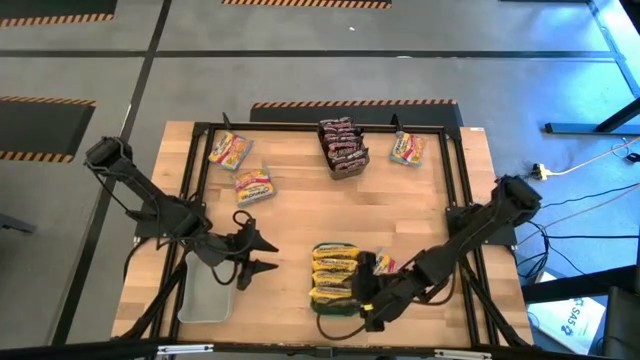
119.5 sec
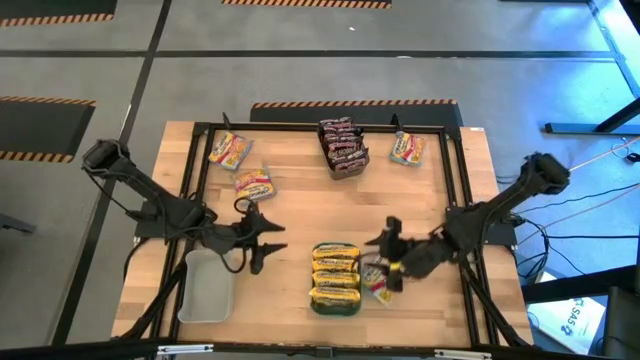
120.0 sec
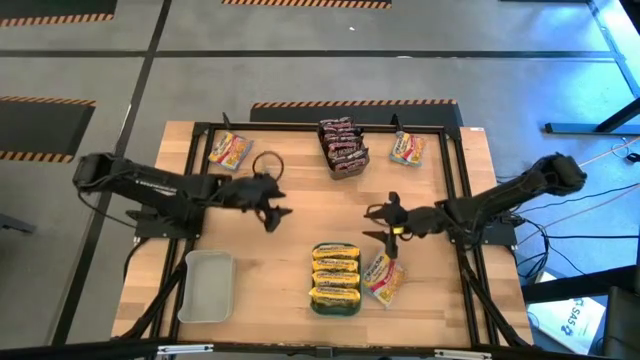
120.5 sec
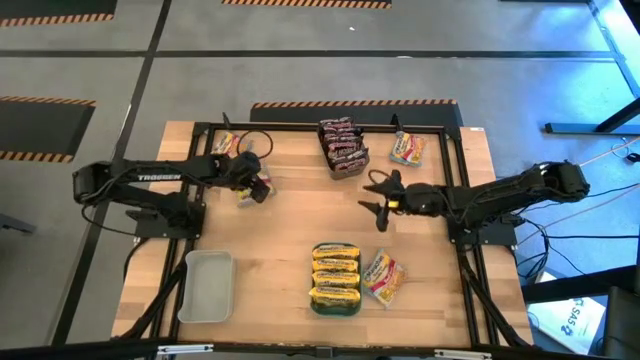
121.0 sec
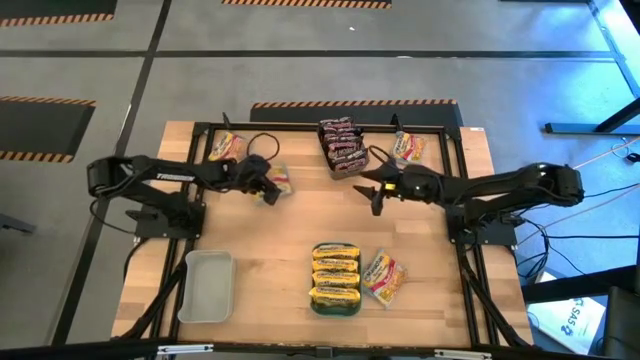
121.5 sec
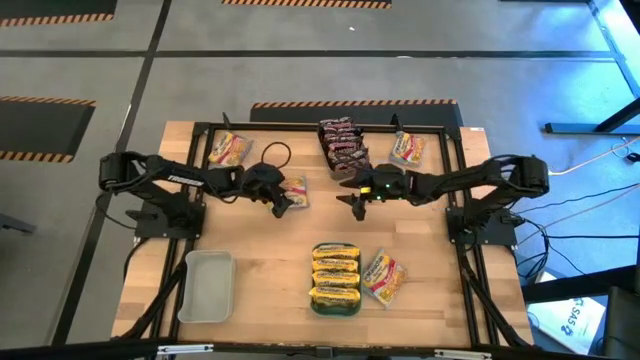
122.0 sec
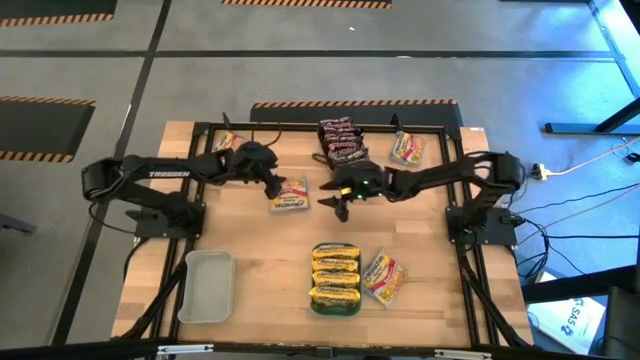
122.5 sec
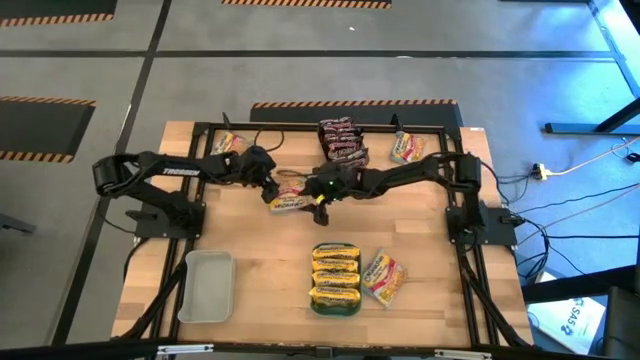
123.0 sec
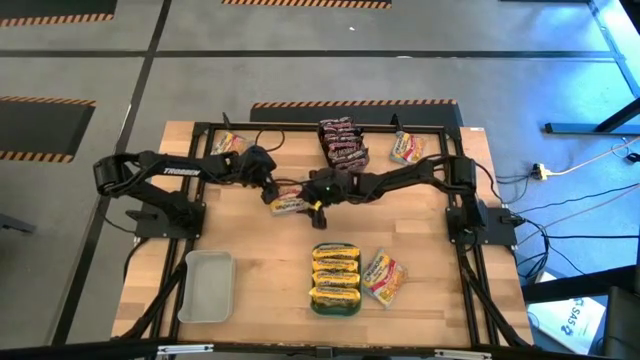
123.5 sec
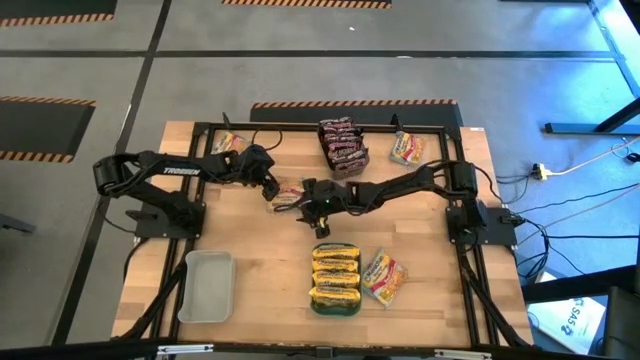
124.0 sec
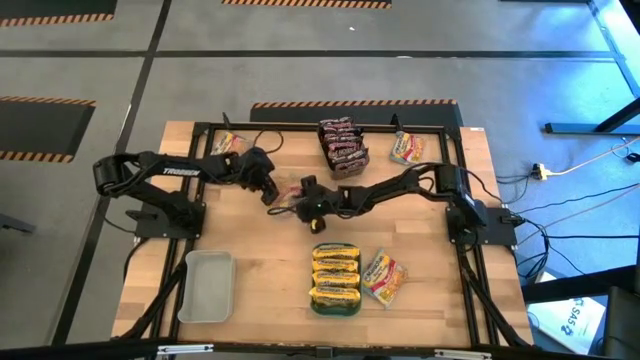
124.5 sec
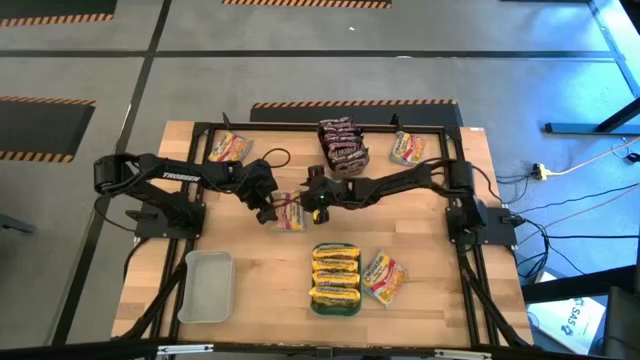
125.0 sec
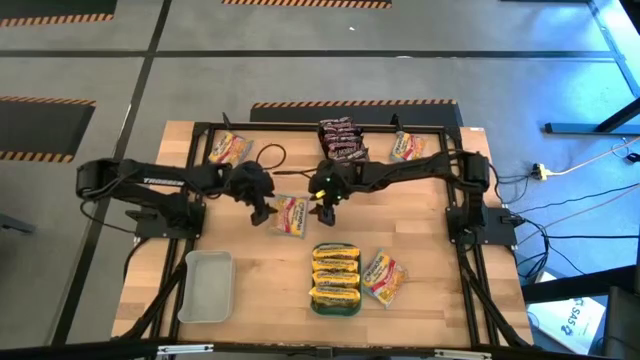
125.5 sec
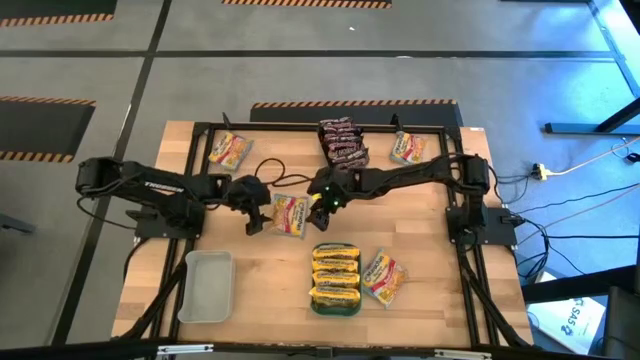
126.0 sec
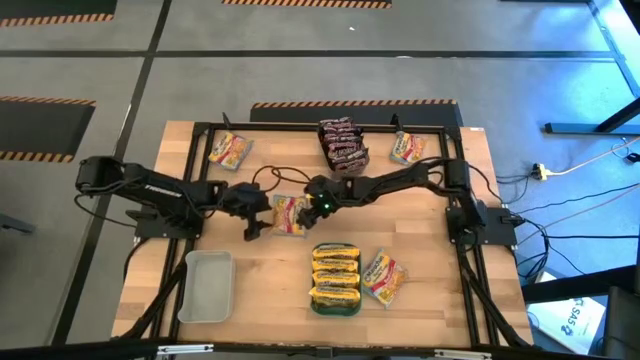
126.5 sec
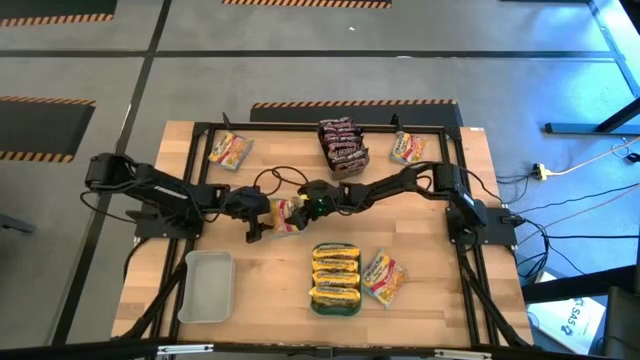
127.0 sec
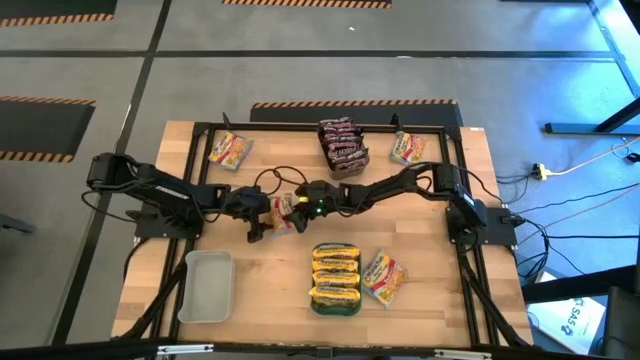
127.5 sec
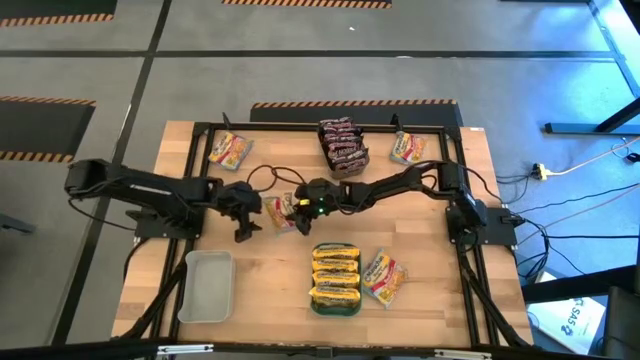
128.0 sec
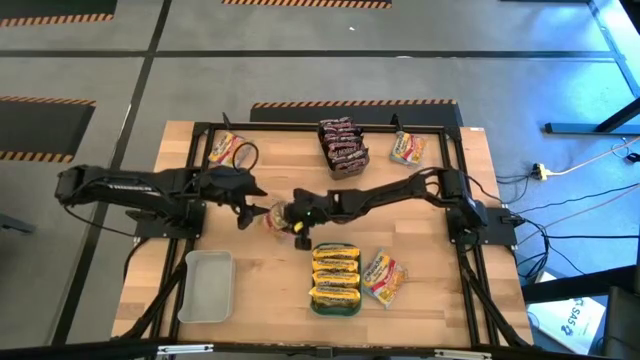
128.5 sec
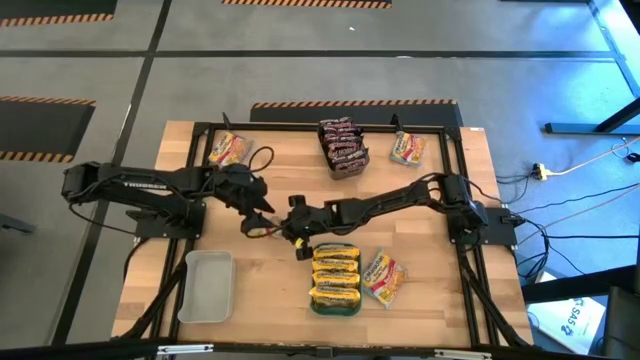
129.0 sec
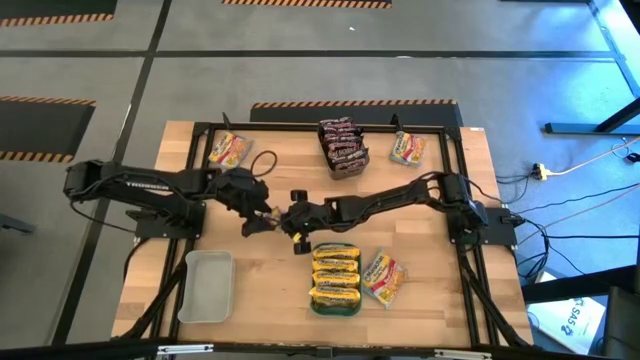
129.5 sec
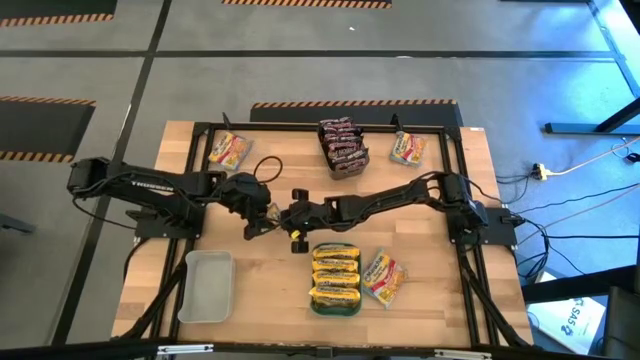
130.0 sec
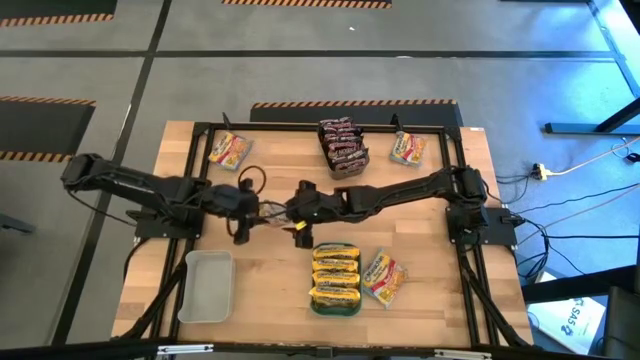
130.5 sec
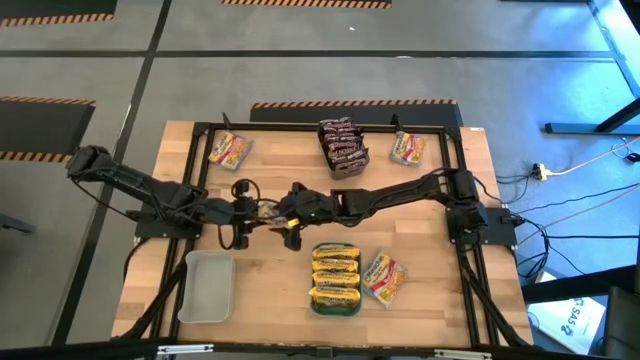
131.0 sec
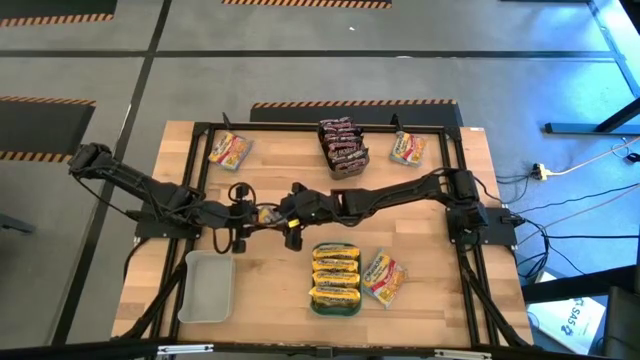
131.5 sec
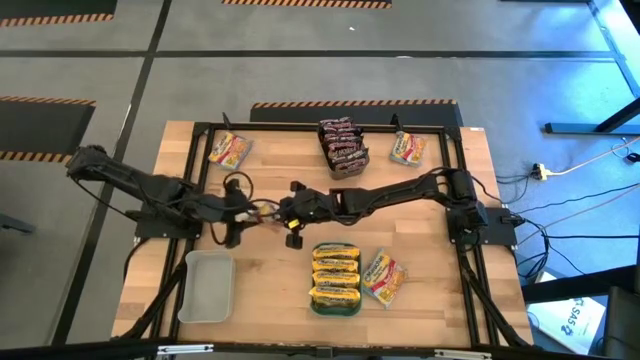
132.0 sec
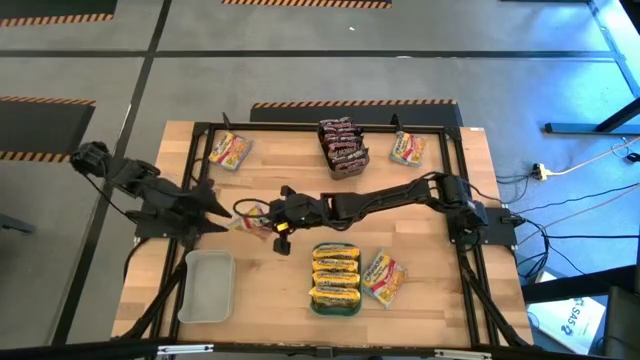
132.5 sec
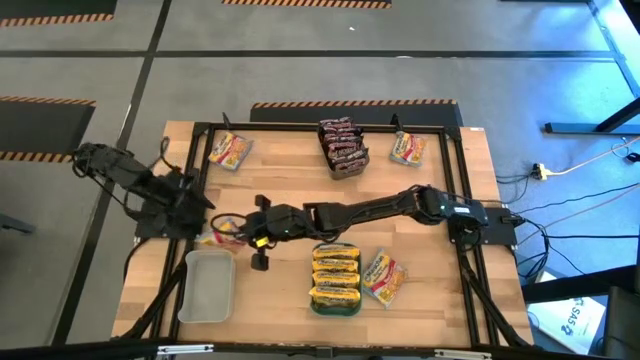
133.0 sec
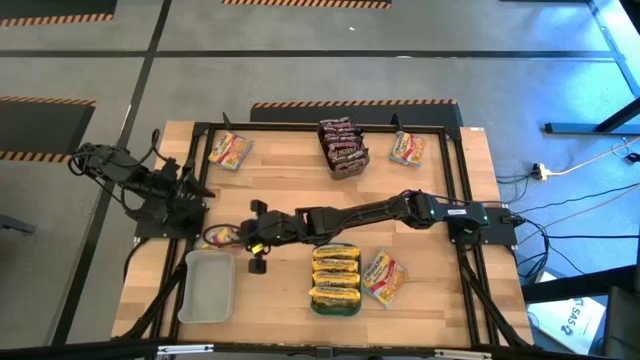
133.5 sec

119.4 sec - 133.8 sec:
Task: Sort Maruchan noodles
Put the blue noodle pack into the white bin

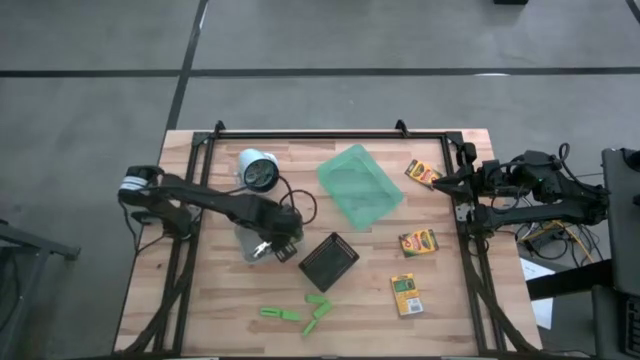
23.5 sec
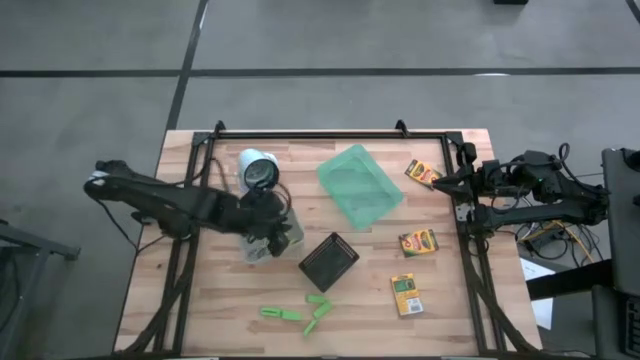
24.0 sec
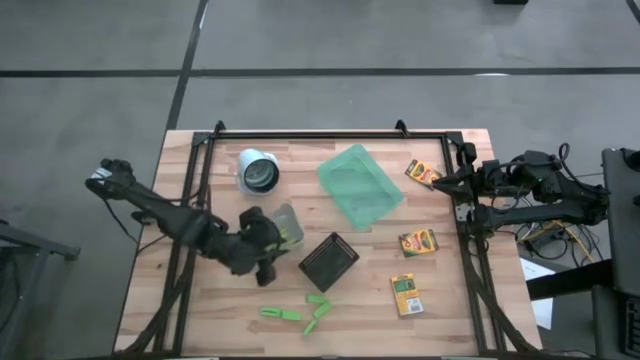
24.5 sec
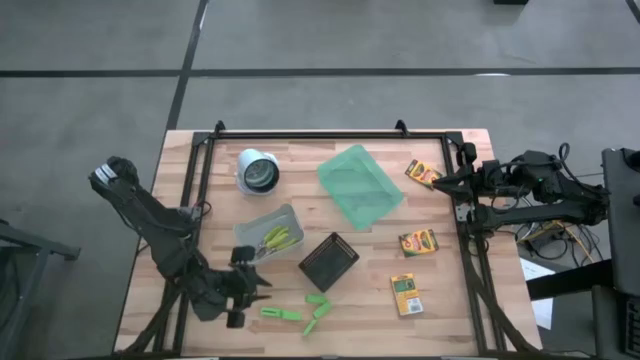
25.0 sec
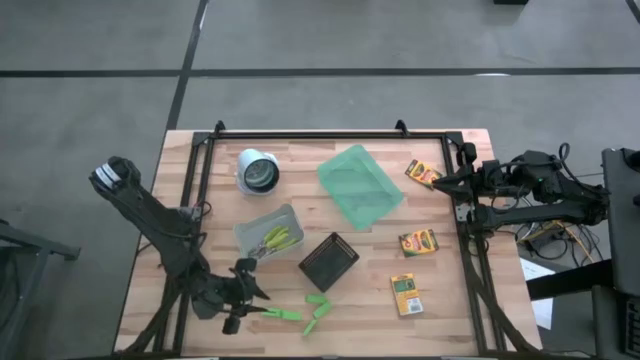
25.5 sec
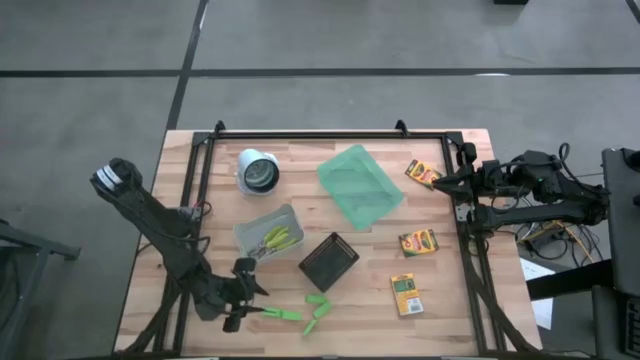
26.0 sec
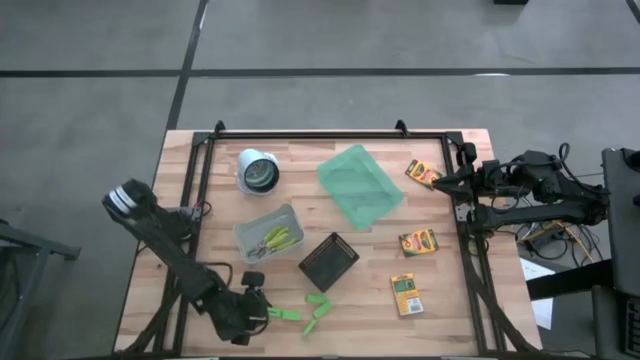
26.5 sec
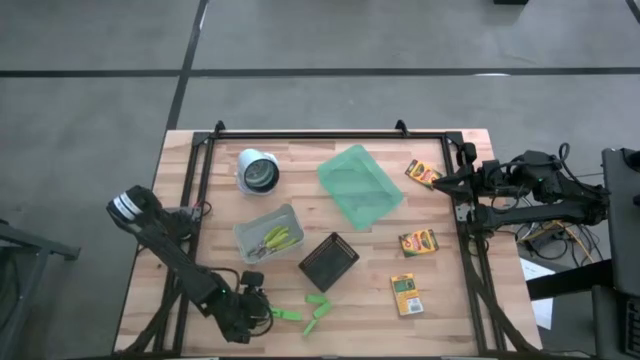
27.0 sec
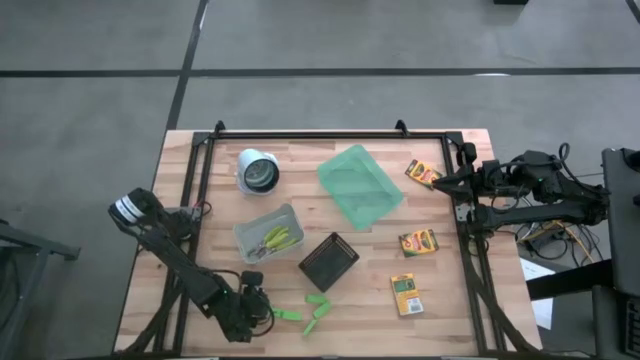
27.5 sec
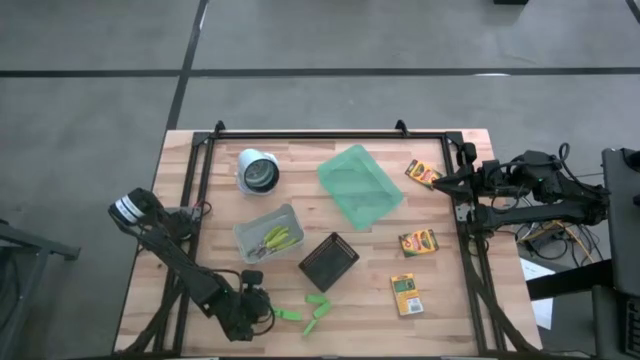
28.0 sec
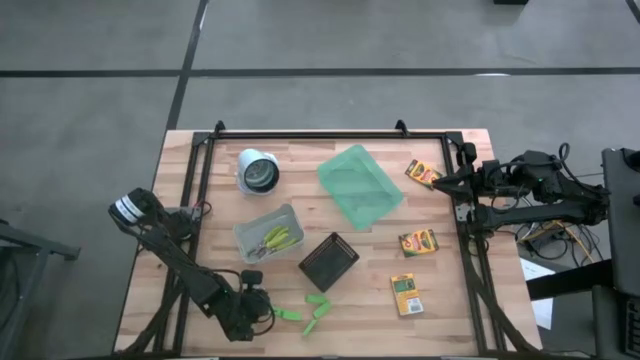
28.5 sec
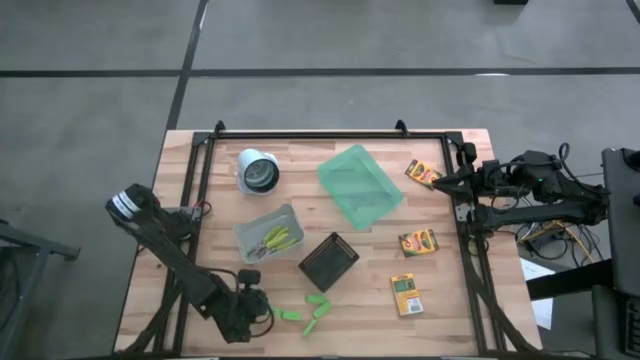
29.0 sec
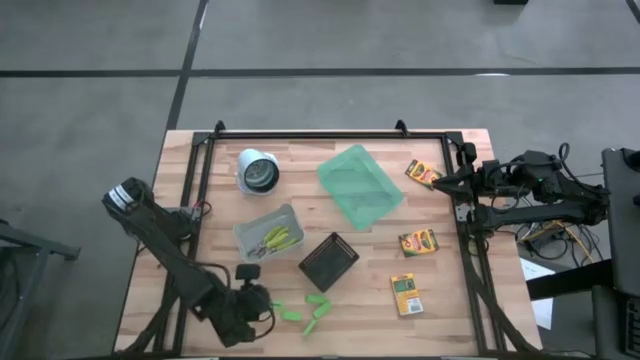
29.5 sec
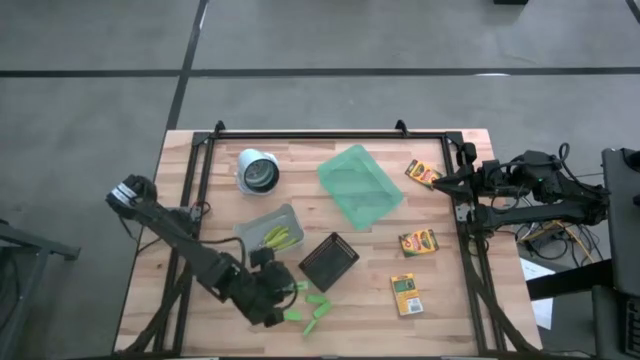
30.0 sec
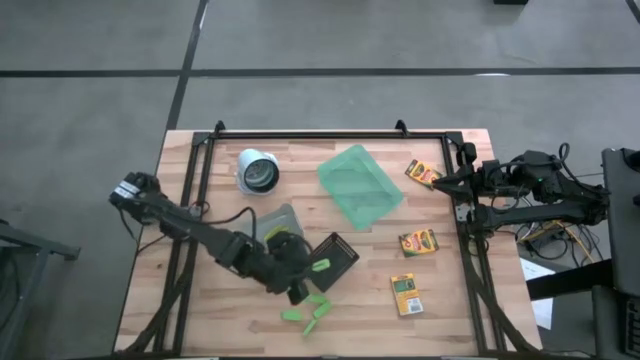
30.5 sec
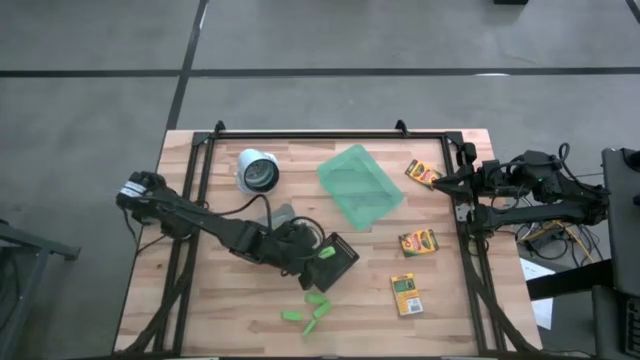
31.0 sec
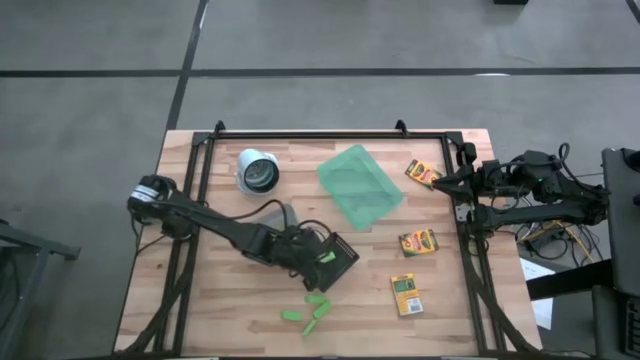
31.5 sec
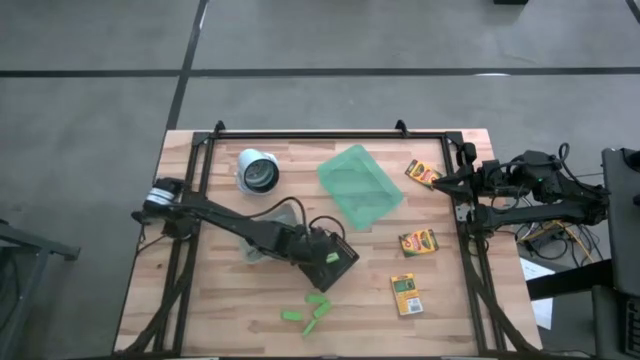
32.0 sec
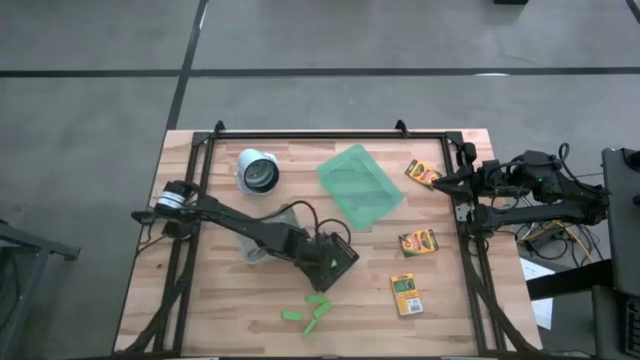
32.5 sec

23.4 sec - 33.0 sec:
Task: Pick & Place School Supplies
Put the green eraser into the black bin
